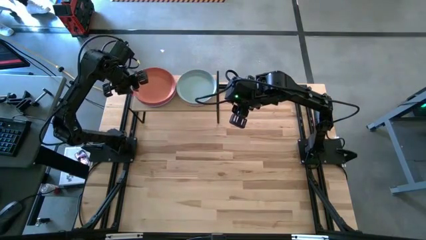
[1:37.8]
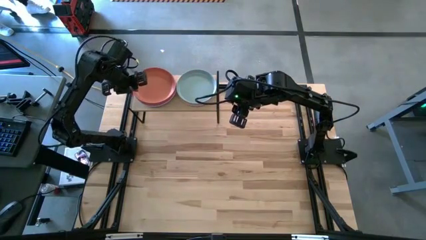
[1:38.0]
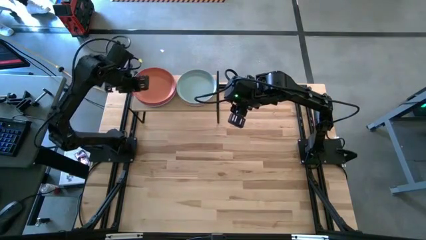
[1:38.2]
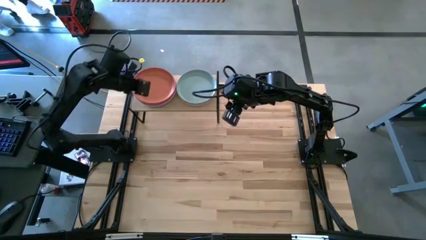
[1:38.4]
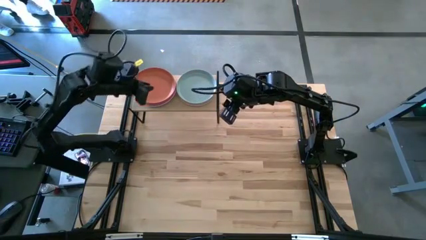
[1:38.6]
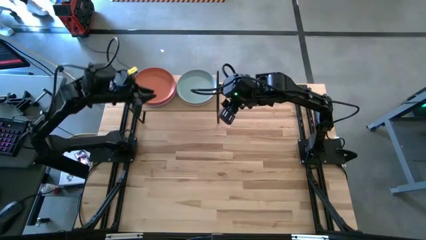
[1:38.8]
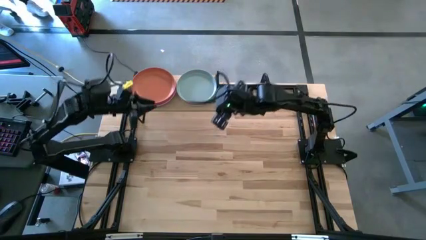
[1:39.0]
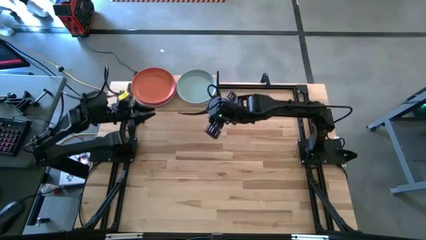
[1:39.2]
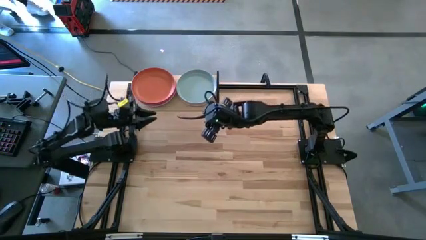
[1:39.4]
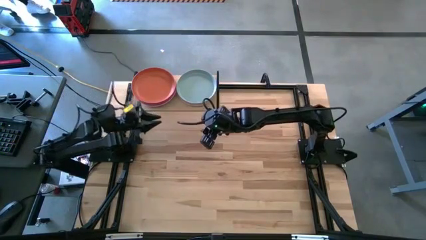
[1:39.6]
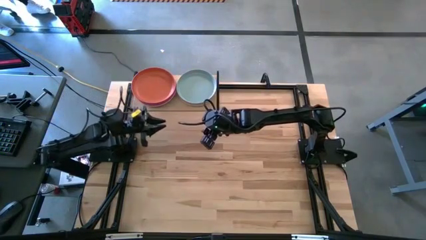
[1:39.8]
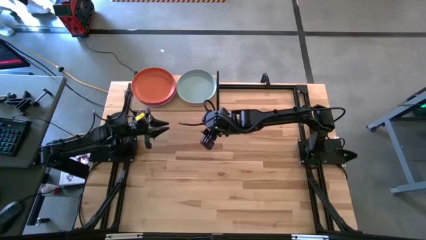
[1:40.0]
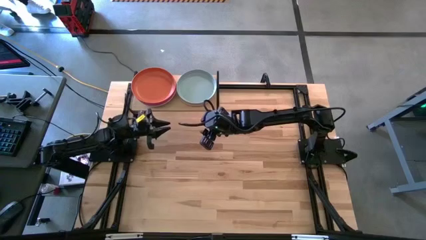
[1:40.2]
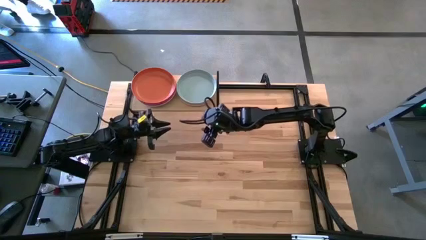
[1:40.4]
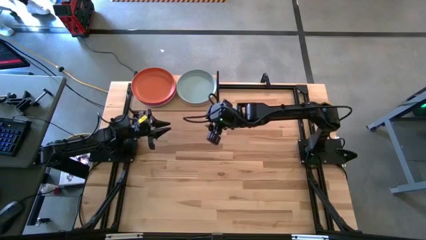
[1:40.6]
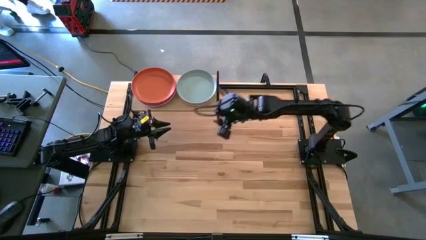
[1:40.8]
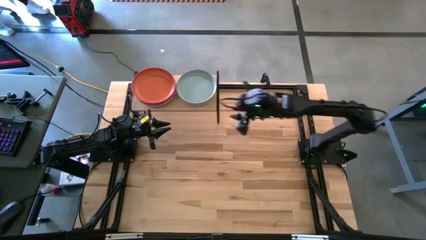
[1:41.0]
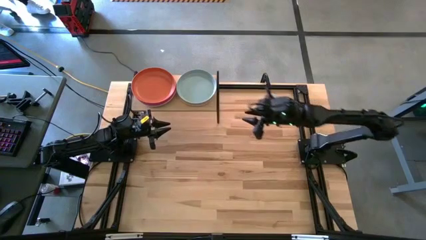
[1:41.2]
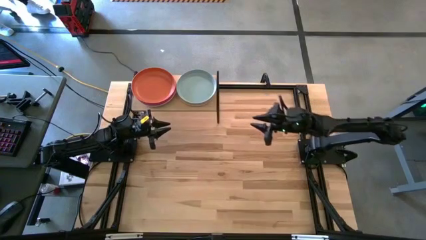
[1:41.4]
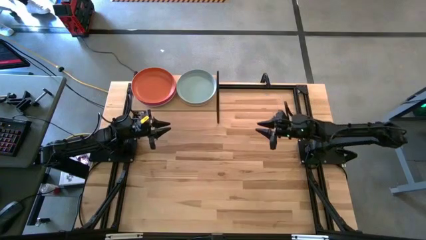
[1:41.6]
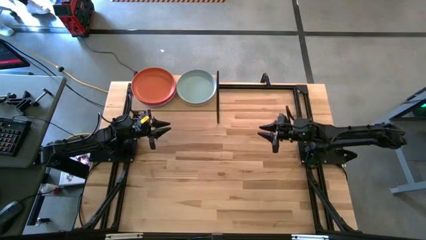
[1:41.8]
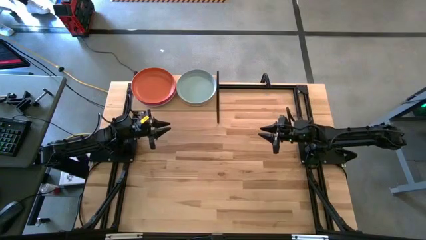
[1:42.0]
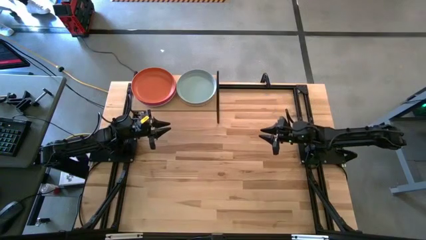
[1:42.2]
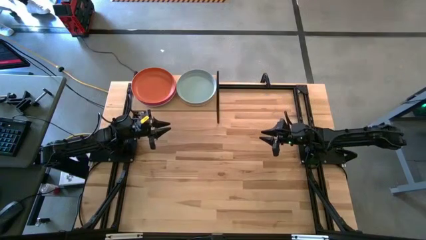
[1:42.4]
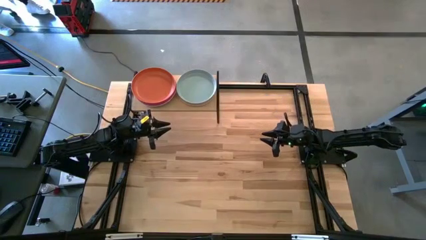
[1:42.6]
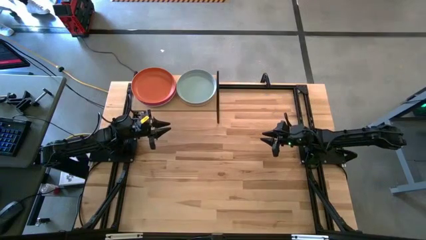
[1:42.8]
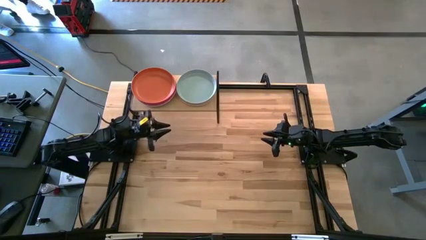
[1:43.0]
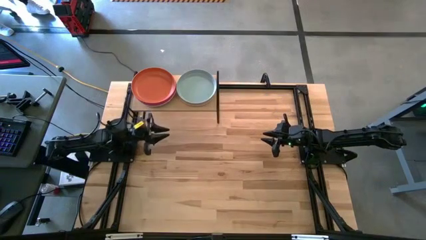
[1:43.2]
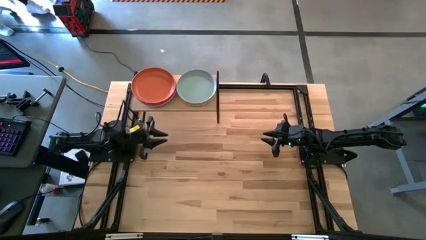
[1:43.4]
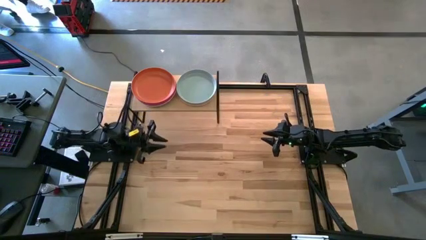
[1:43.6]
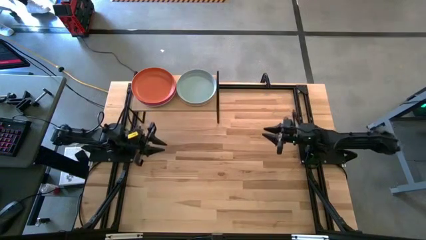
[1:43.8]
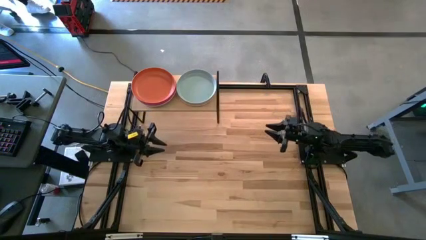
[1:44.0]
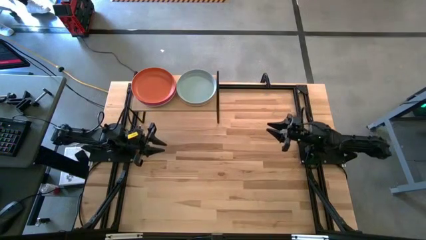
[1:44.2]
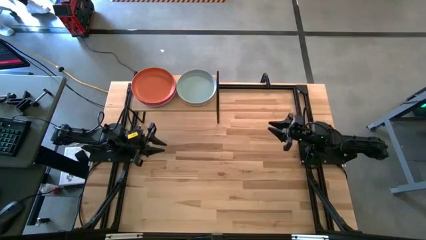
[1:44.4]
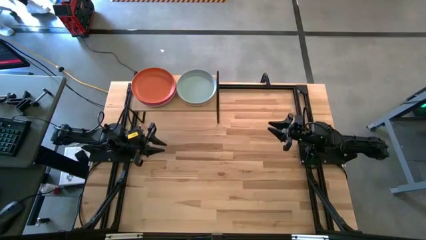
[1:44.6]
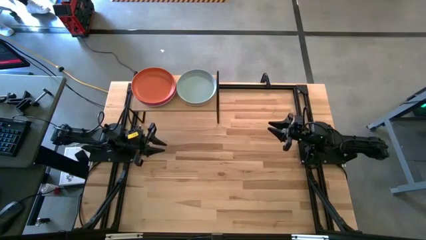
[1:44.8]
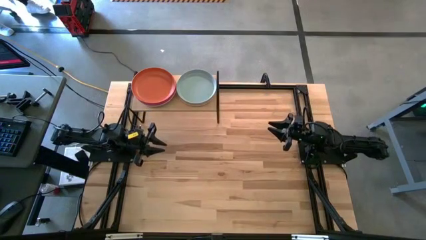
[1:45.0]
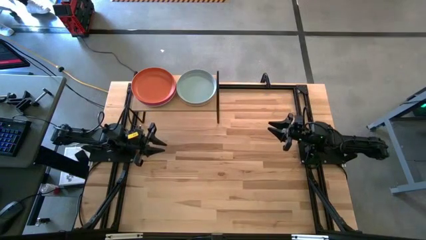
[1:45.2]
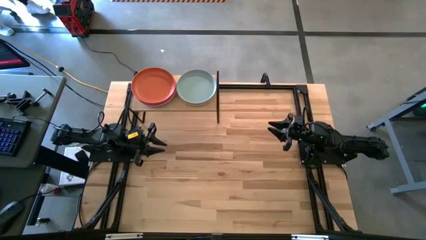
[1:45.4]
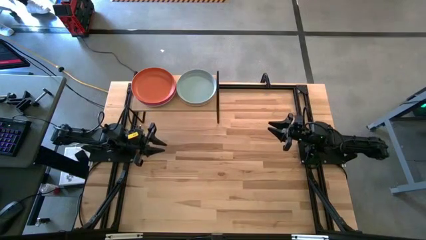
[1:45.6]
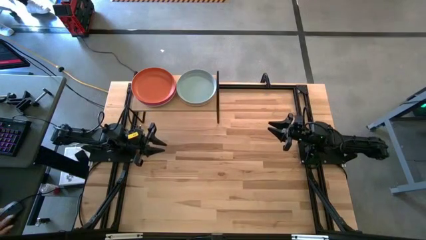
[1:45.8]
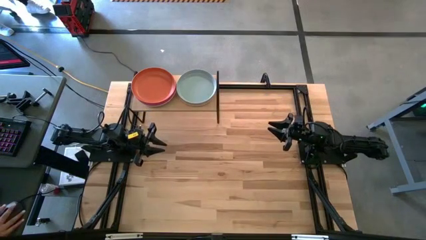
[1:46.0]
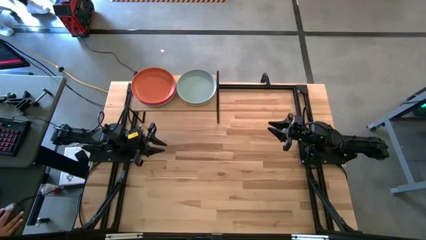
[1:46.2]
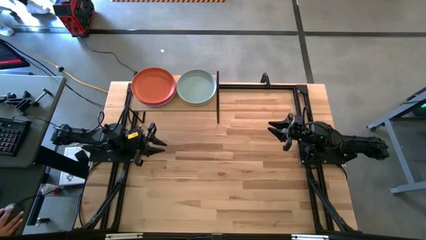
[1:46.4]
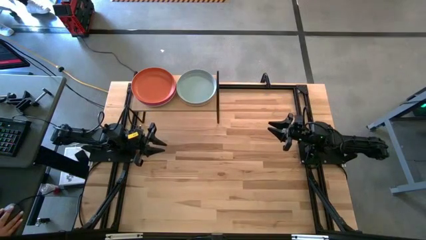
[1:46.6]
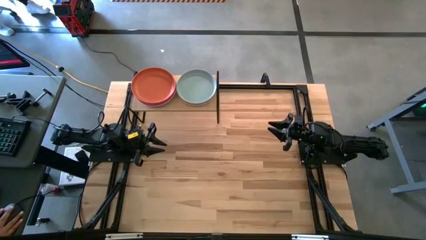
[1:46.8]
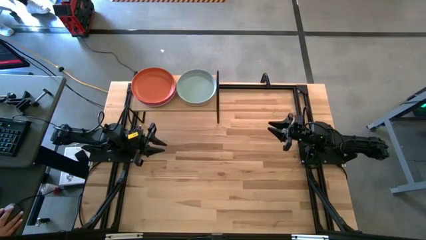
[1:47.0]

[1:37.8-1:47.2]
Task: Place and stack plates onto a shelf
Return to Home Position

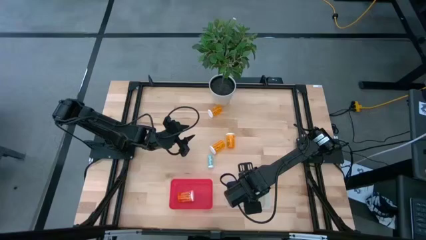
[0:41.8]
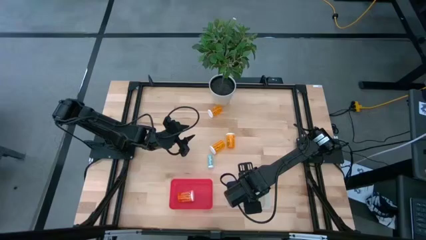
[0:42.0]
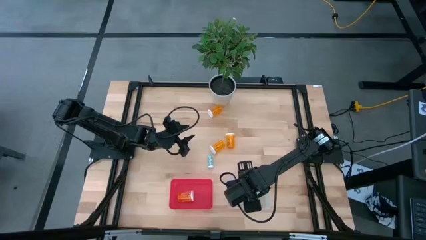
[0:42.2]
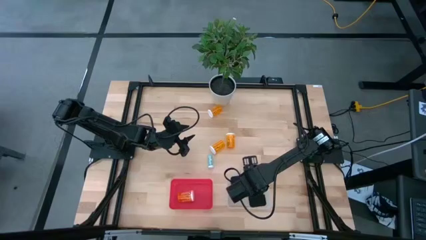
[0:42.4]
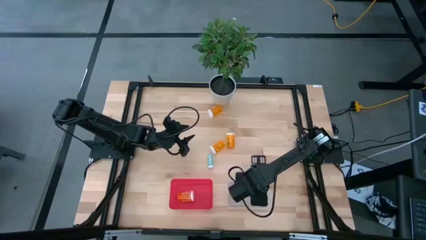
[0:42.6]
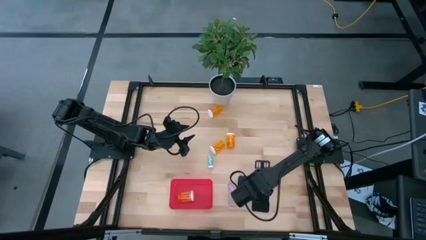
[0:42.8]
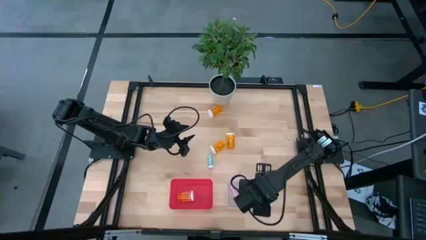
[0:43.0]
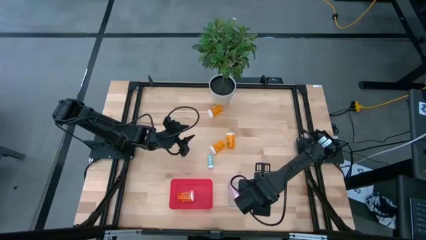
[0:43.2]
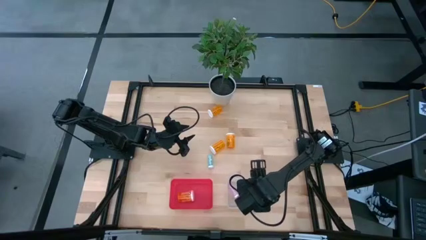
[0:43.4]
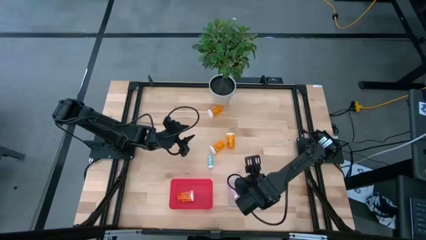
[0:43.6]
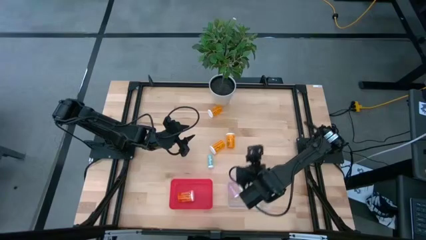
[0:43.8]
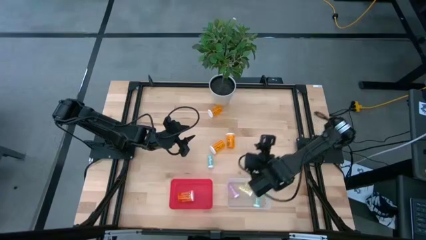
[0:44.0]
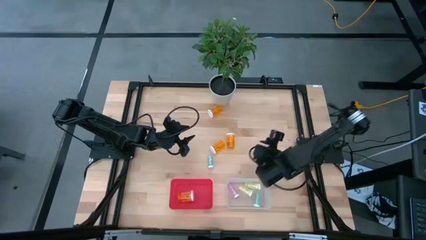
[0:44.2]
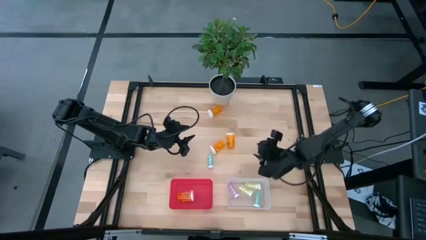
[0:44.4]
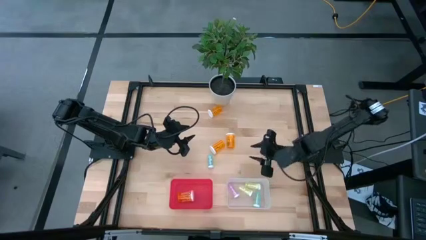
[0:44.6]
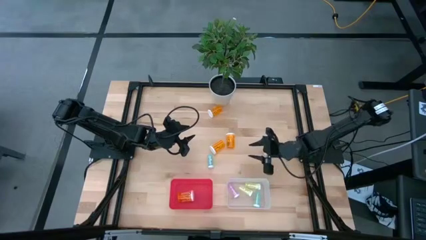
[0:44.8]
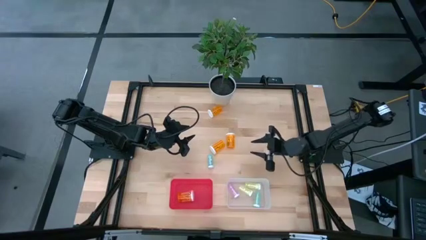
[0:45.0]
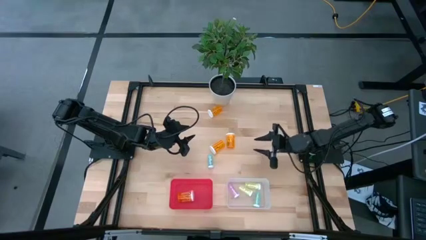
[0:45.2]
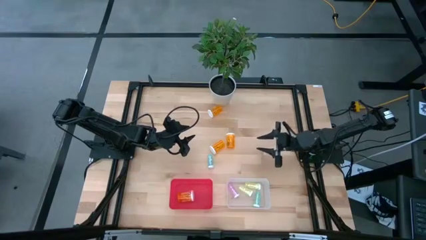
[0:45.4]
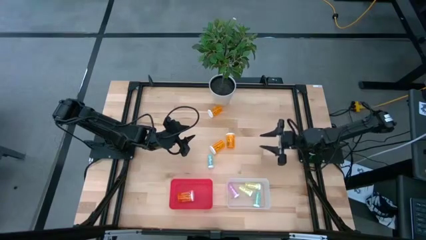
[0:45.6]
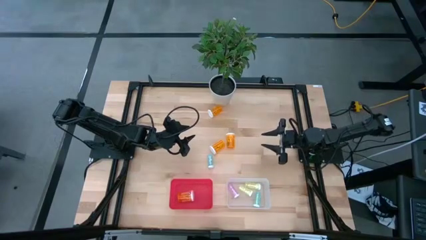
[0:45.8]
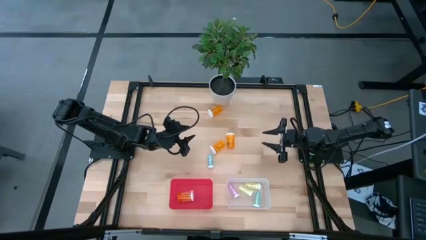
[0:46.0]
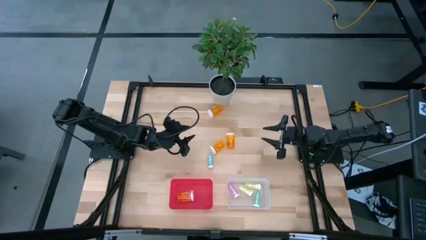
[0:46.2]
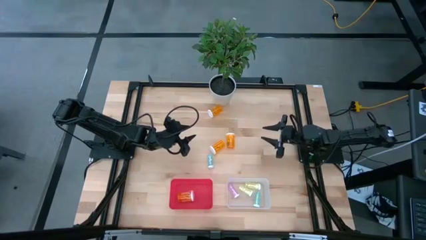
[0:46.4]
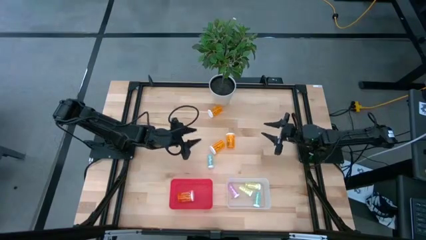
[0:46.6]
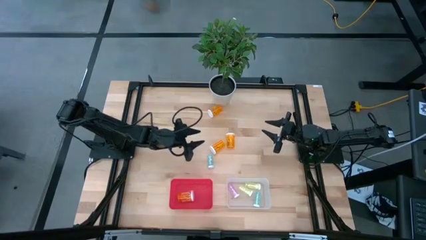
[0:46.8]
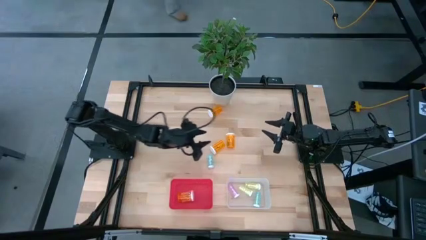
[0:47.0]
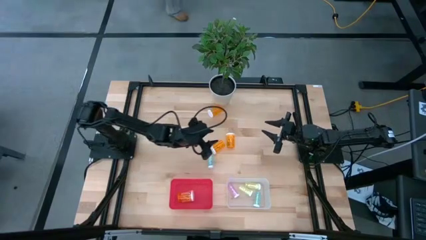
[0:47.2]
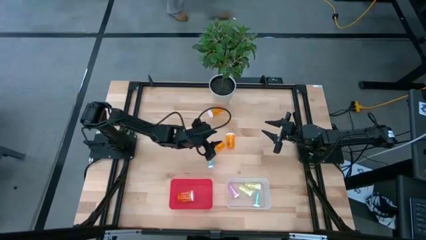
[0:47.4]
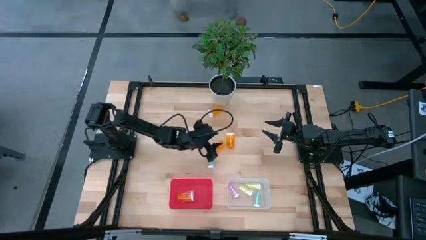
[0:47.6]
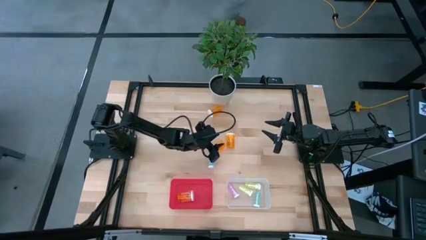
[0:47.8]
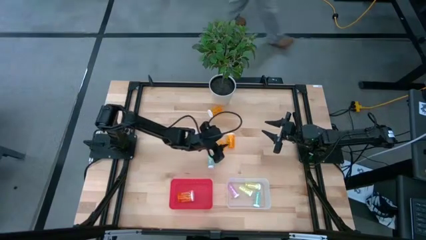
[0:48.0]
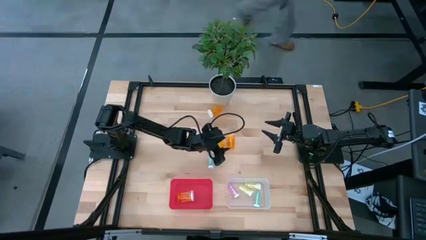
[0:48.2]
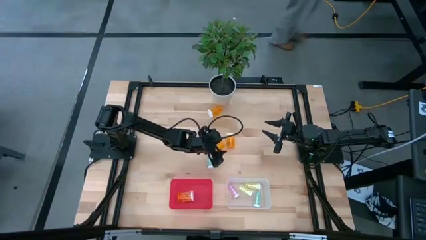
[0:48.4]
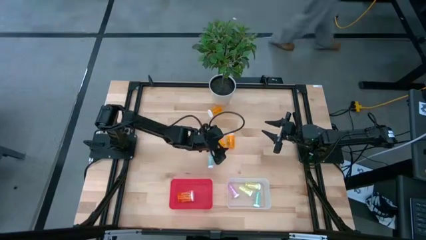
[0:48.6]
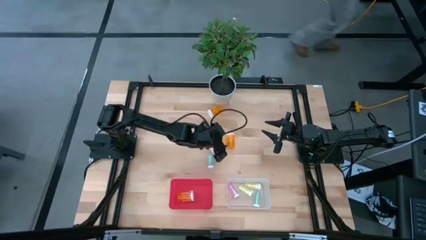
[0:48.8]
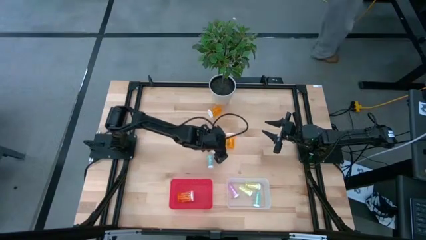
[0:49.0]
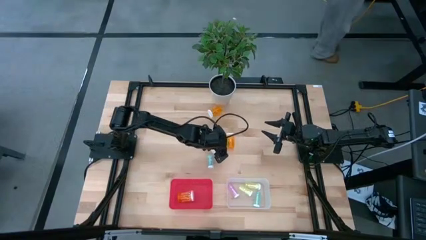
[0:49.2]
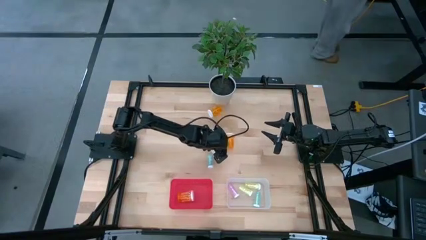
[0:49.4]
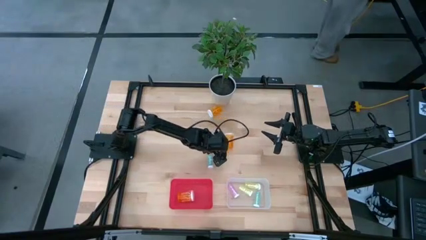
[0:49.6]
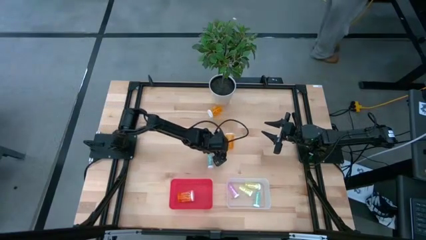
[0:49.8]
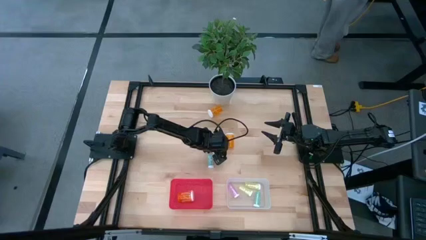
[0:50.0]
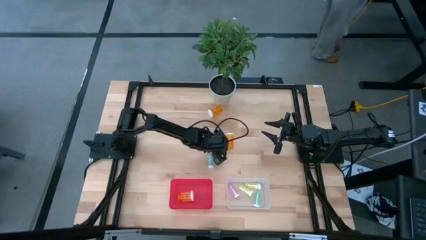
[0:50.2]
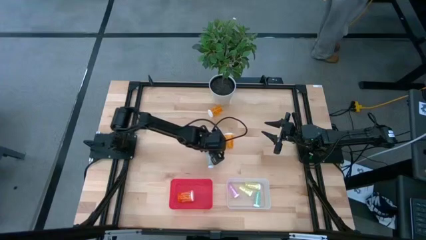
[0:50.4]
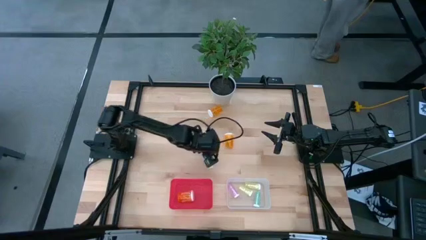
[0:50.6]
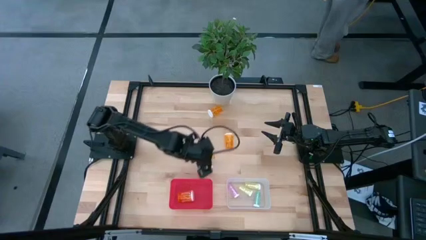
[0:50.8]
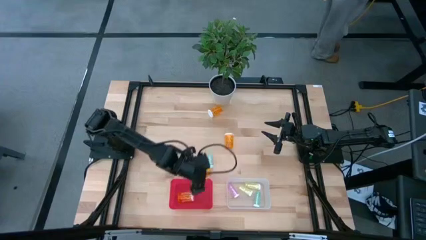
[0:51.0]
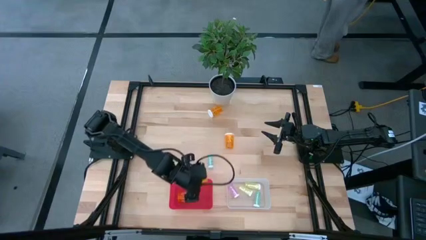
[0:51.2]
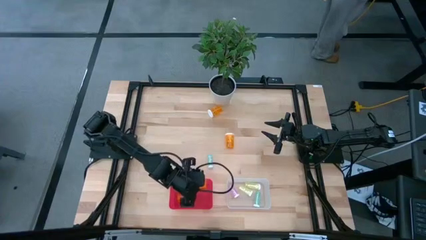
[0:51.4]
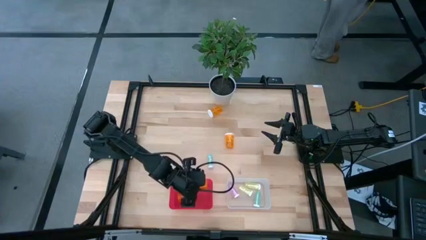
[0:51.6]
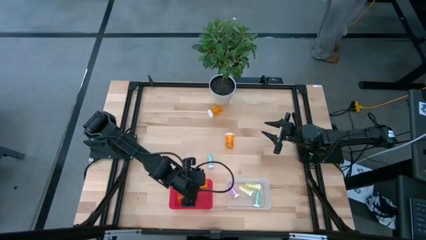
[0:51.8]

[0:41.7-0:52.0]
Task: Pick and place medicine bottles into bin by pill shape (circle, oval)
Put the bottom left large orange pill bottle into the red bin
